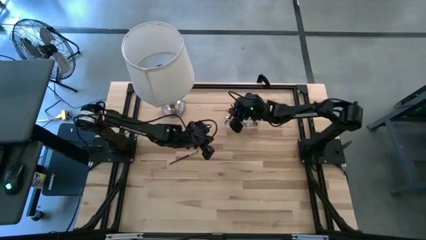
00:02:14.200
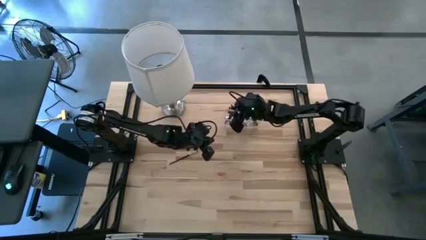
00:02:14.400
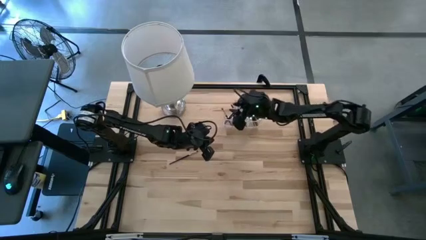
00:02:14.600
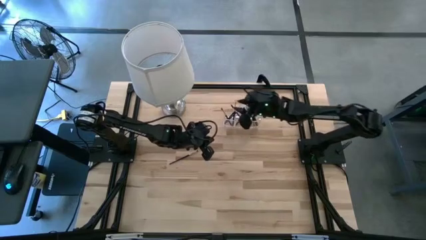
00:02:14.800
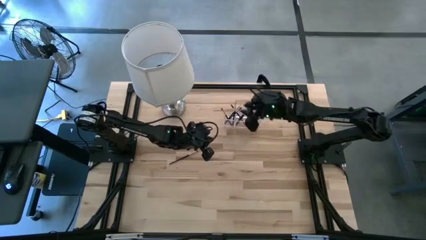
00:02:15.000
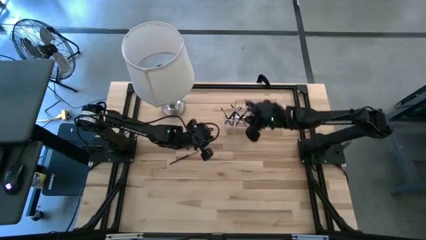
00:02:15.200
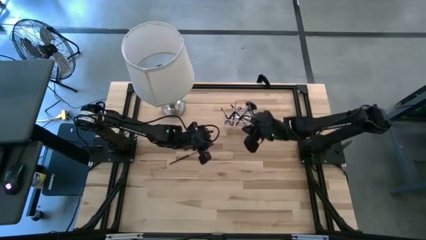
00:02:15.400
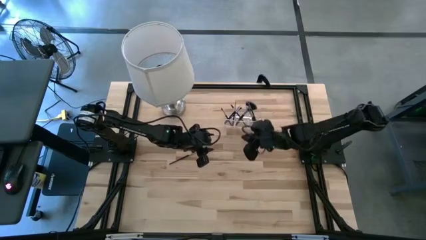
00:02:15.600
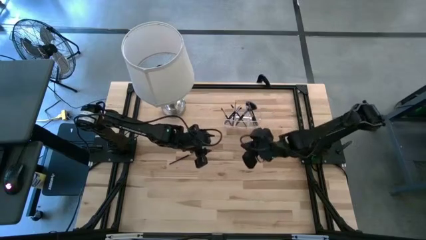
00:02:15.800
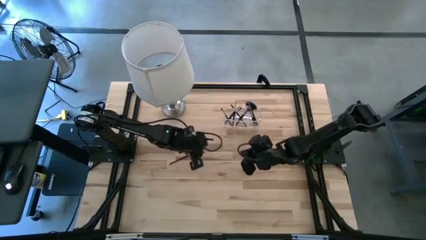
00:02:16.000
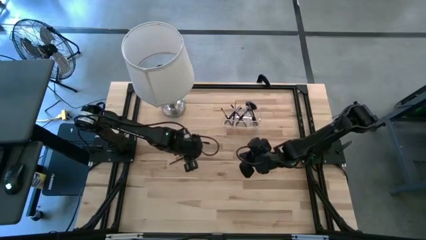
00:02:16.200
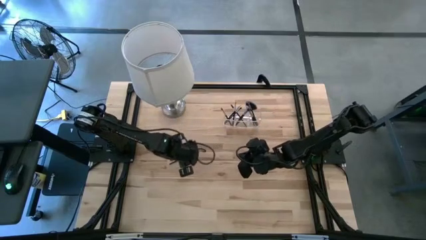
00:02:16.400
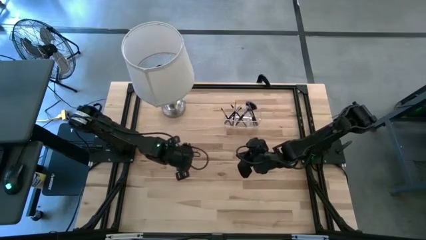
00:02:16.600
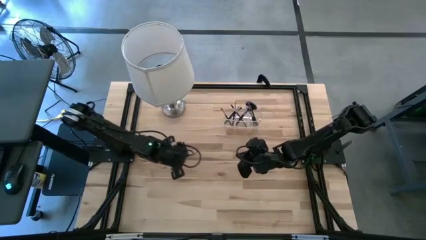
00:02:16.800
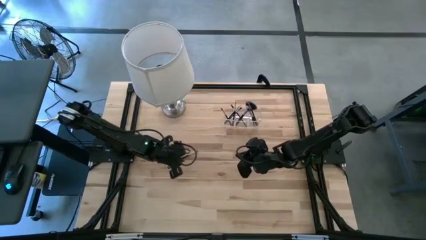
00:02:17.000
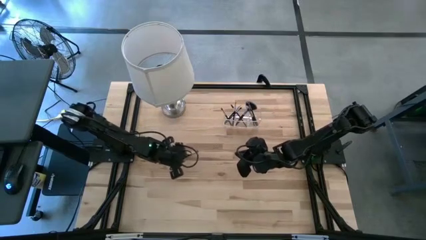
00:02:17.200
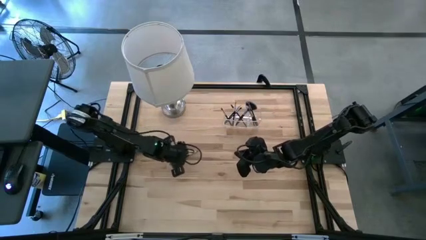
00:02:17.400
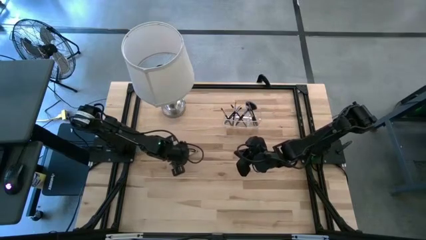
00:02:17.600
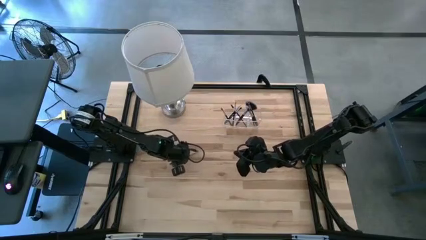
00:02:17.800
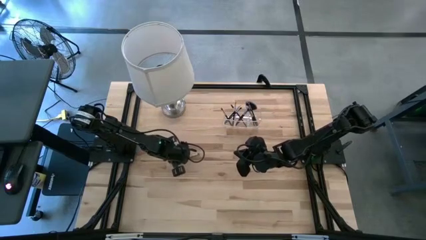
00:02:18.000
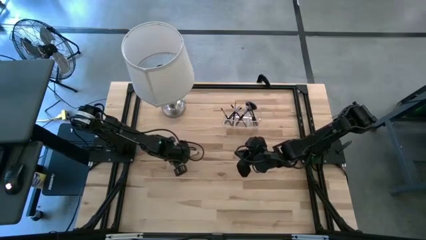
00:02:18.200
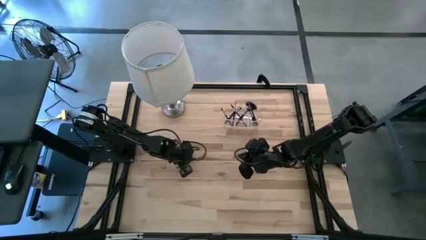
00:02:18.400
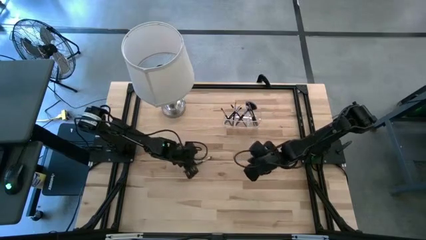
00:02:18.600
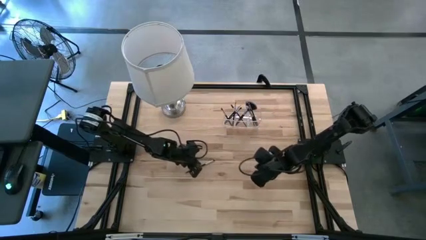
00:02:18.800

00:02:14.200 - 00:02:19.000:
Task: Pick & Place Makeup Supplies
Put the makeup brush into the transparent organizer

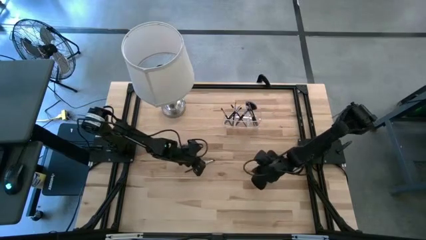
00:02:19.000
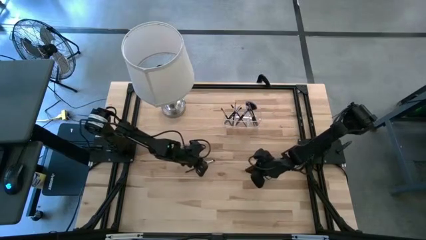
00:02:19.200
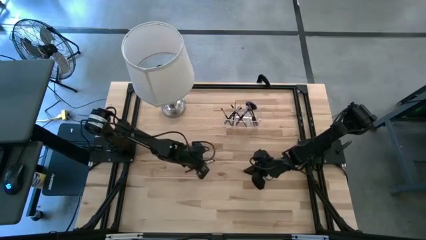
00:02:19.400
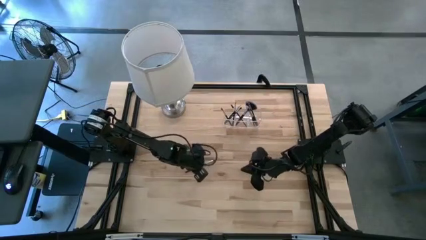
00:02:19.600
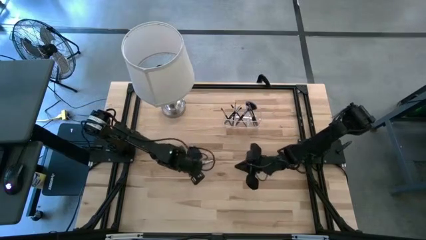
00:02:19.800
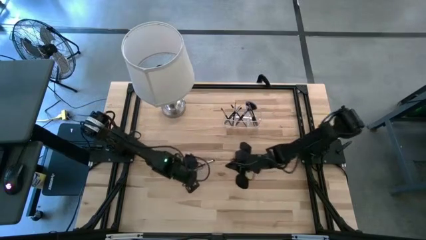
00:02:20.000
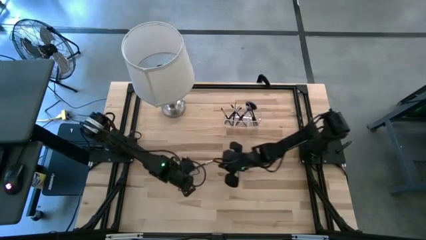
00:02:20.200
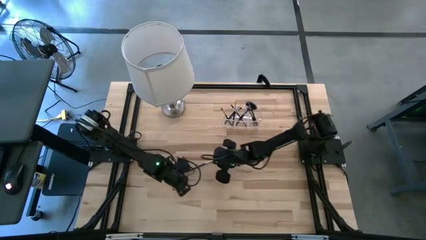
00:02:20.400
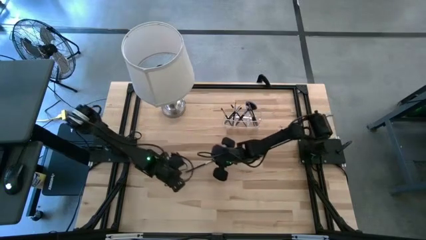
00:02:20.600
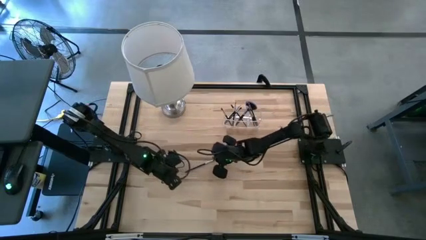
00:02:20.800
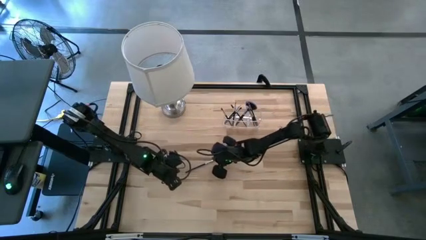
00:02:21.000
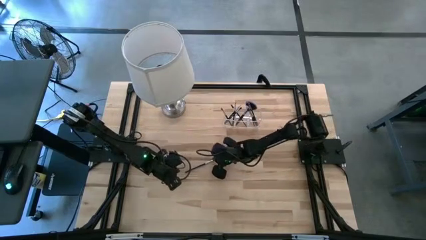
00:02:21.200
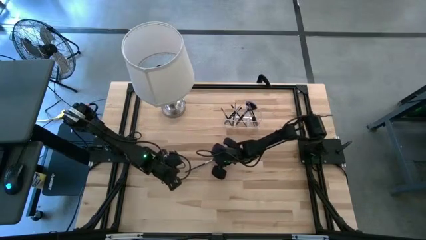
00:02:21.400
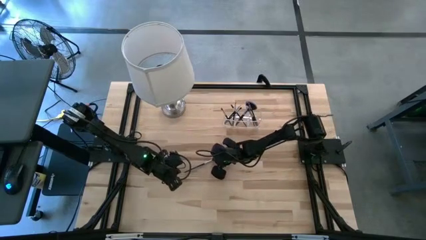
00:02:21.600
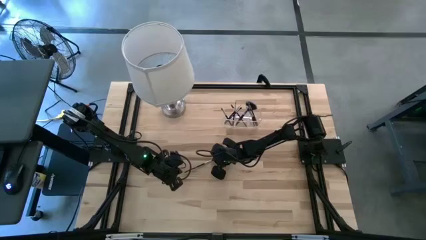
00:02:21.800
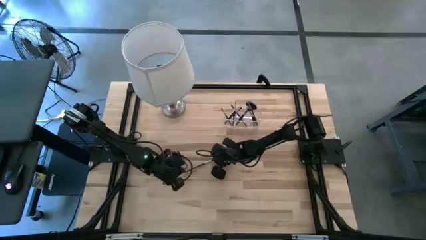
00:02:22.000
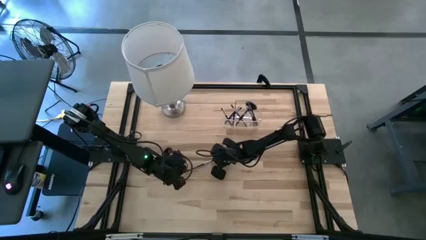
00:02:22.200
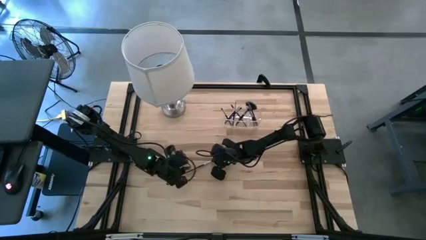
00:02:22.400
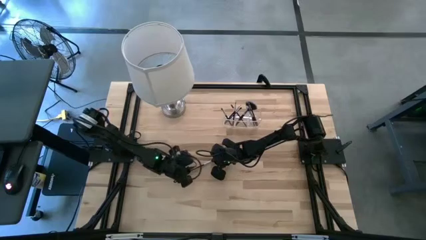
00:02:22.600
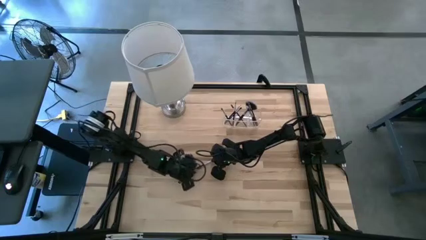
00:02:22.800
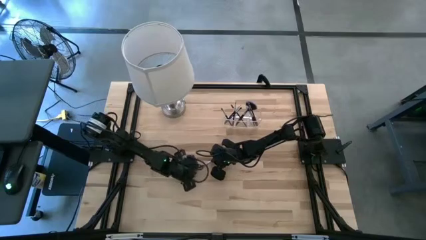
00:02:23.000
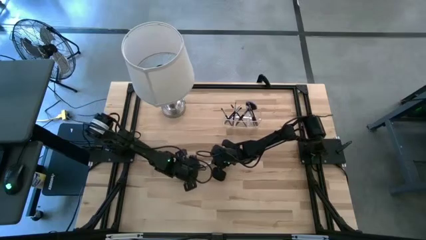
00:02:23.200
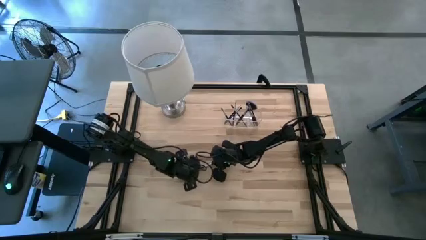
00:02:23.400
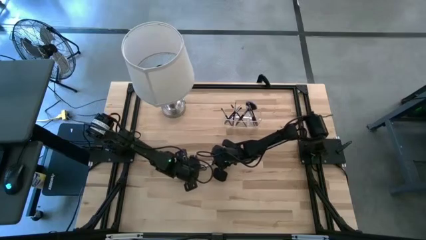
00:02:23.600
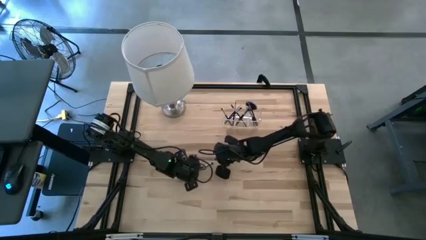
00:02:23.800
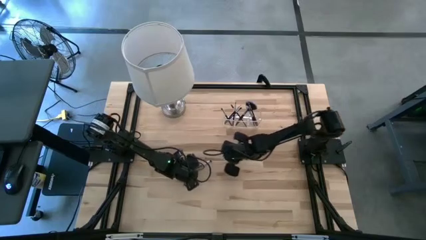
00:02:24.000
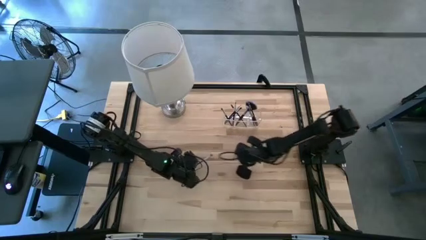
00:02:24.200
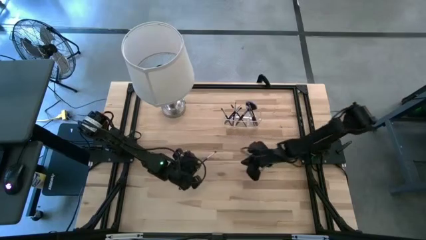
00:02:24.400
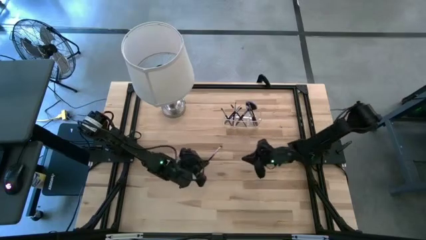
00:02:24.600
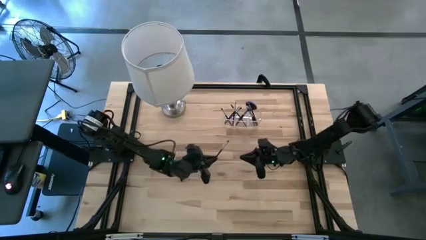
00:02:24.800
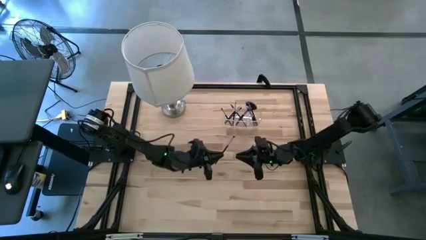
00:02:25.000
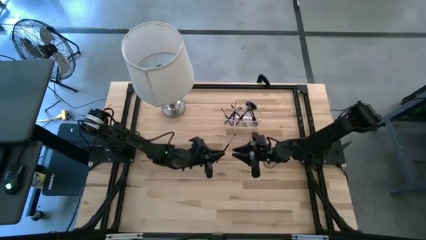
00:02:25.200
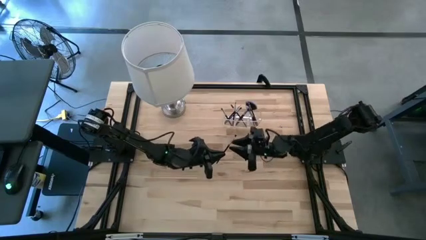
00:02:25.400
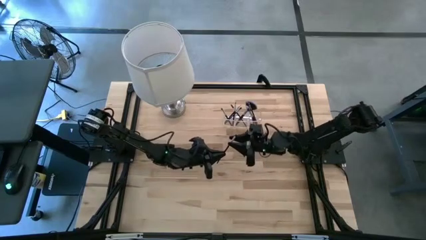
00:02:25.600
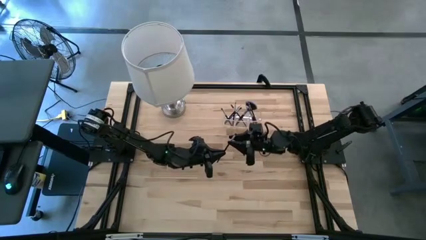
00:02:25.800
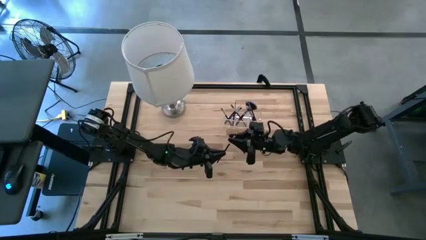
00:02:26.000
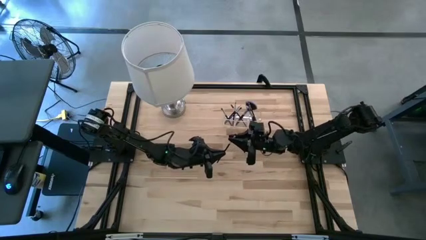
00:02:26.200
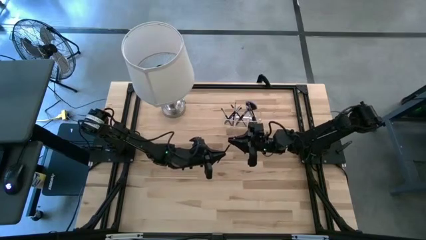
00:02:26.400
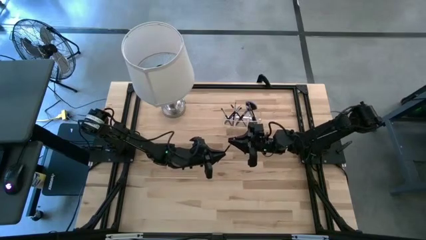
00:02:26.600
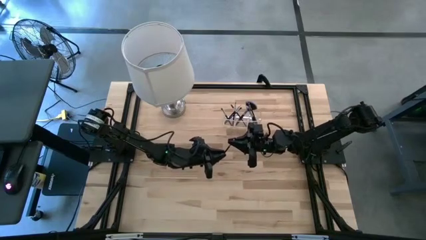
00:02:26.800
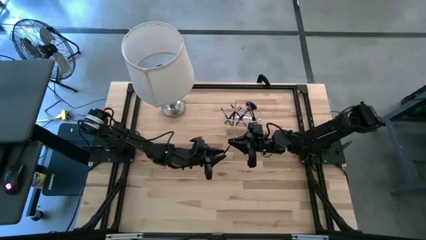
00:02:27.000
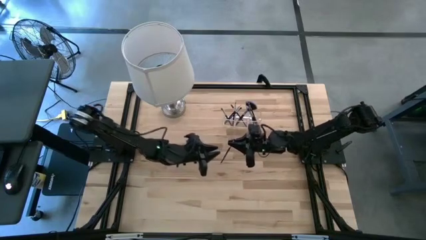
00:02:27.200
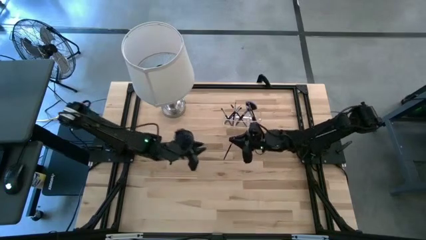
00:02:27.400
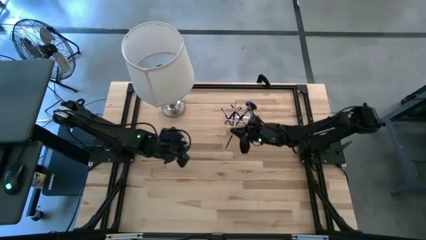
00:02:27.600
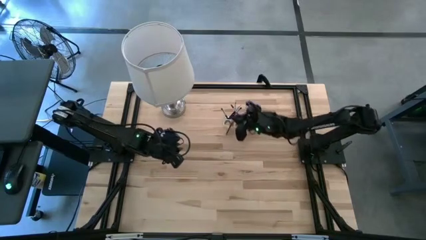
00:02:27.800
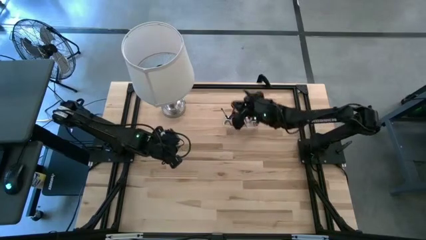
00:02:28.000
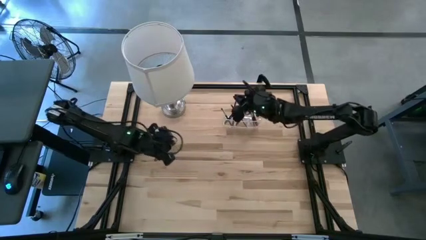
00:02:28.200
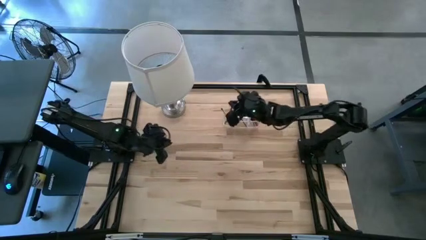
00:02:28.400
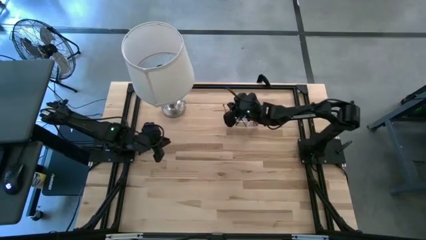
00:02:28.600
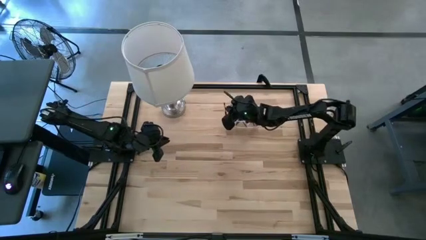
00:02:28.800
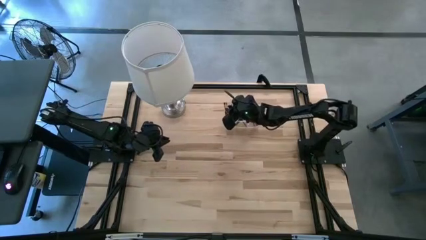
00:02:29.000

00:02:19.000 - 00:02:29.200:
Put the makeup brush into the transparent organizer
